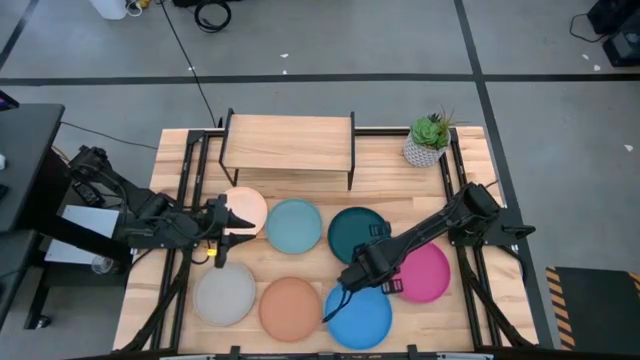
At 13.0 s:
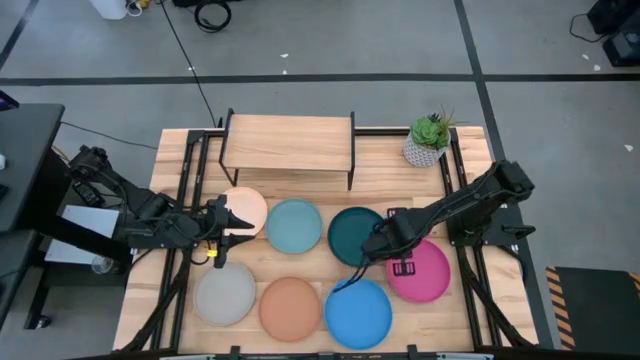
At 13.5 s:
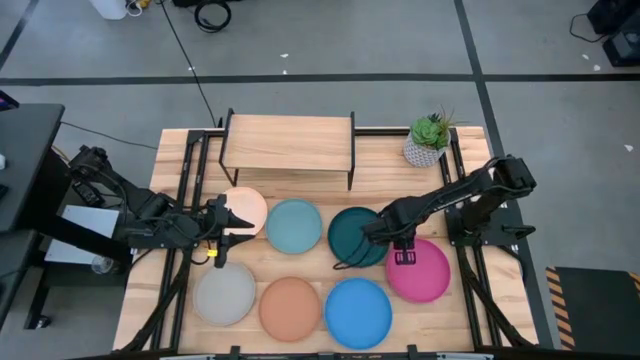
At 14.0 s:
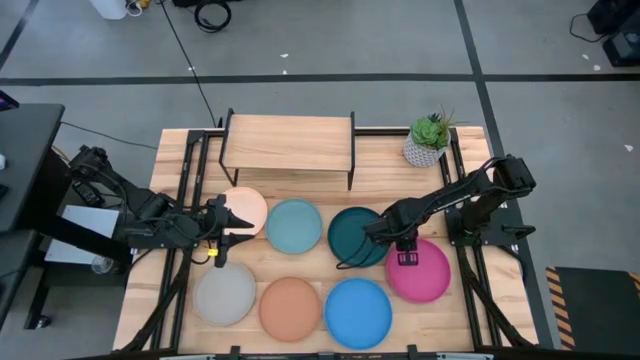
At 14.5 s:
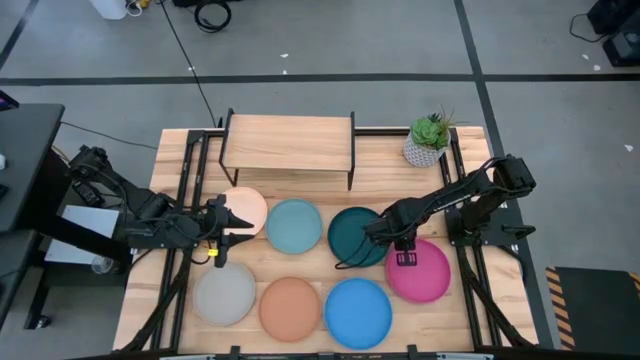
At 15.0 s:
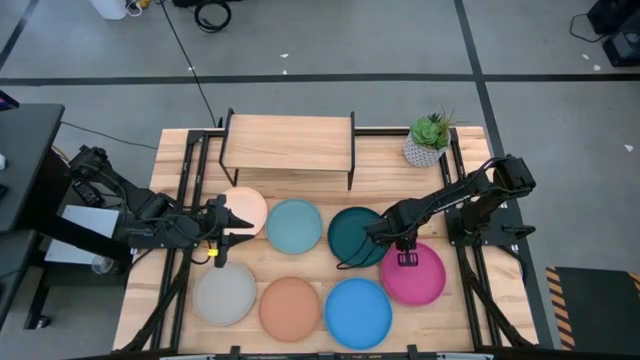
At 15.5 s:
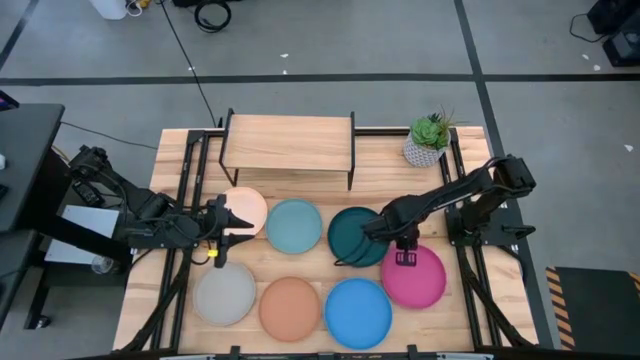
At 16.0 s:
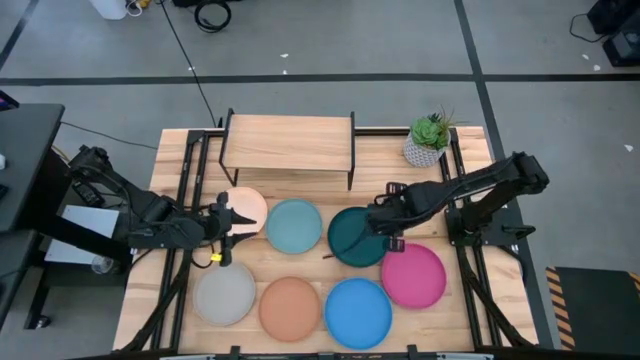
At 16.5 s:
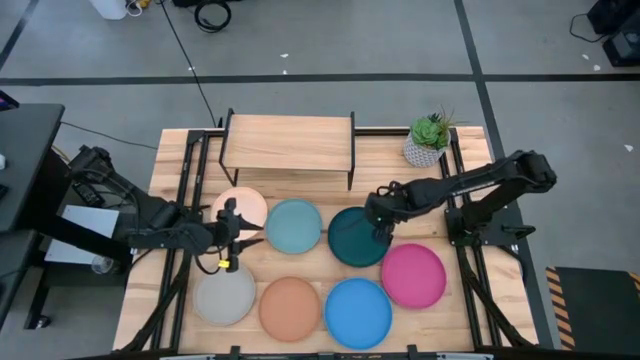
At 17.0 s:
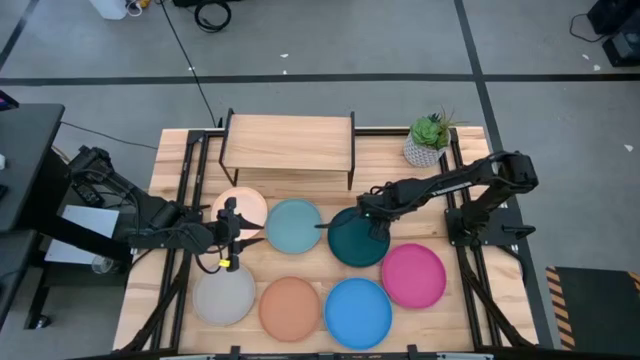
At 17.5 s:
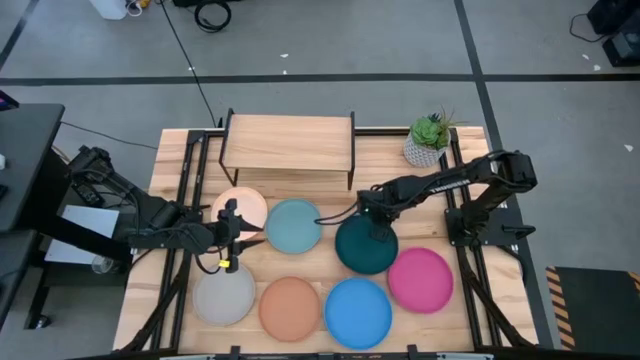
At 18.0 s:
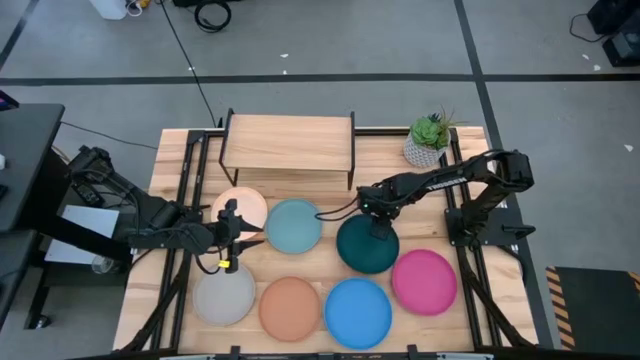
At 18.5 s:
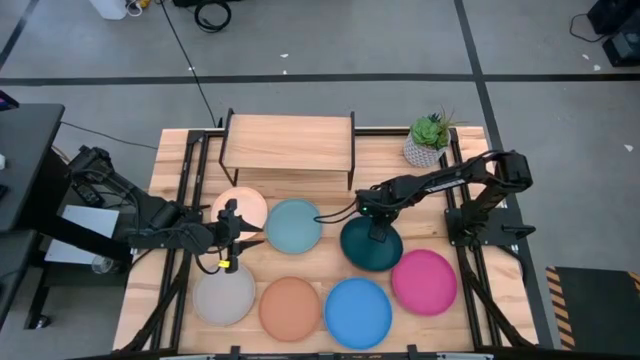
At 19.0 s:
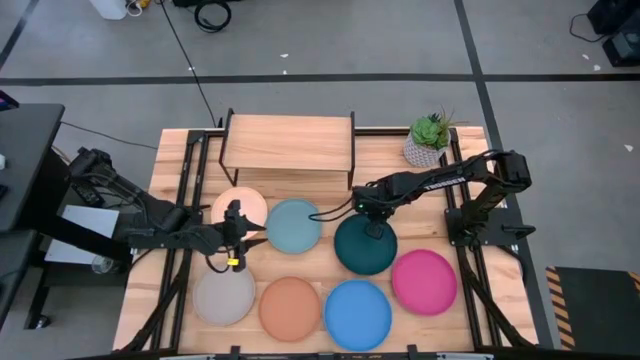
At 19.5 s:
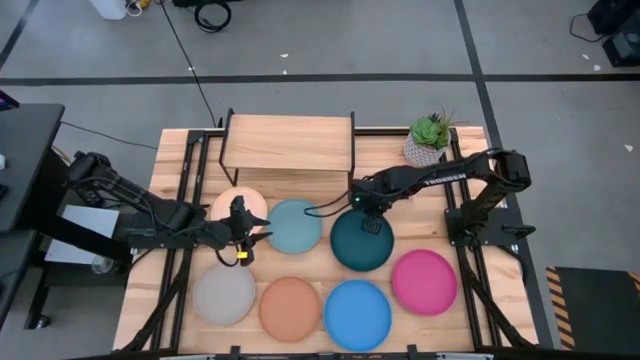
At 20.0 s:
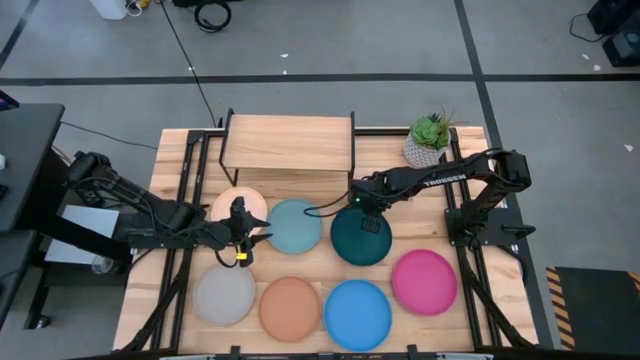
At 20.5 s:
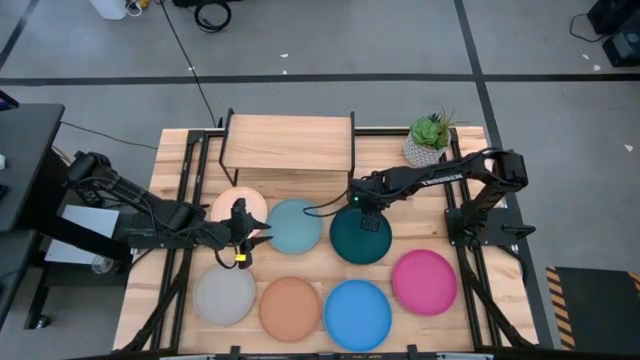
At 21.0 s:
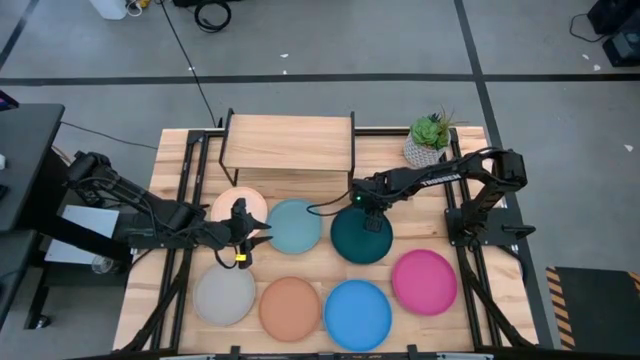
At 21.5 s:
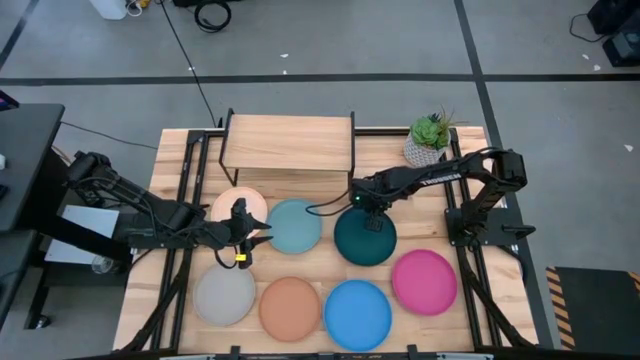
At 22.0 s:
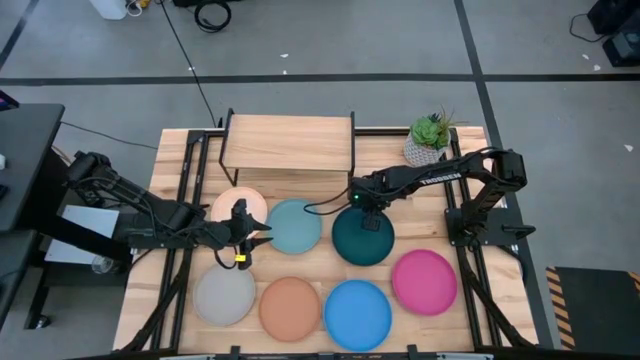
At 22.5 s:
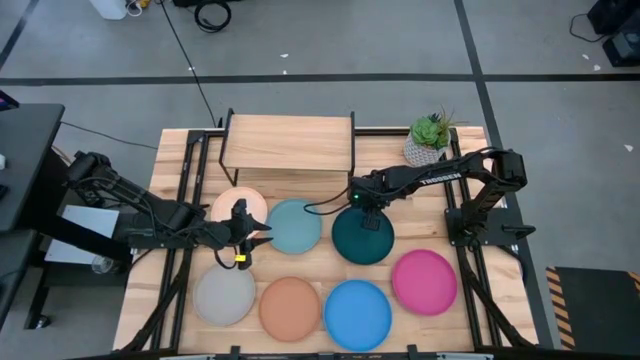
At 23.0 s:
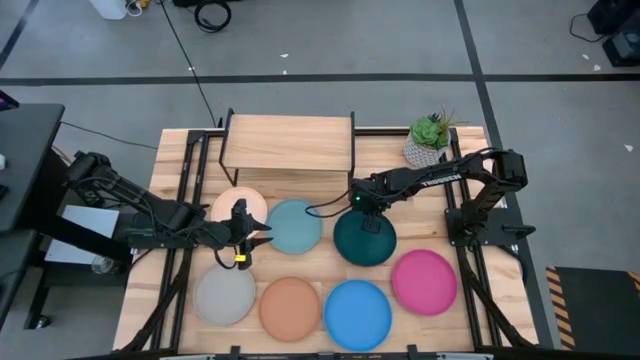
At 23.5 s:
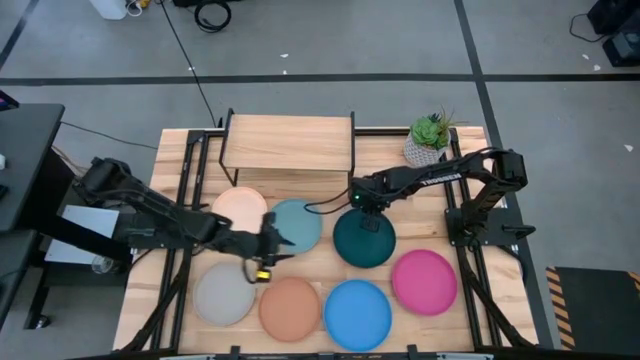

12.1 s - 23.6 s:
Task: Place and stack plates onto a shelf
Put the dark green plate on the shelf

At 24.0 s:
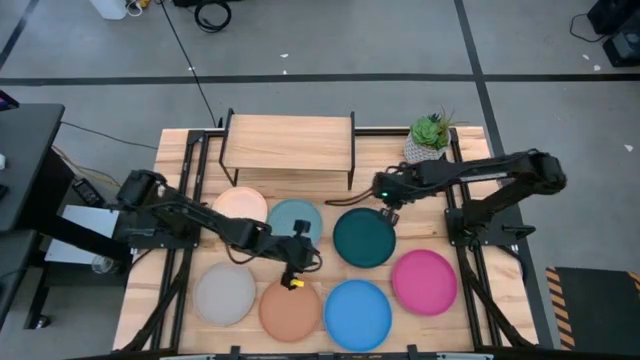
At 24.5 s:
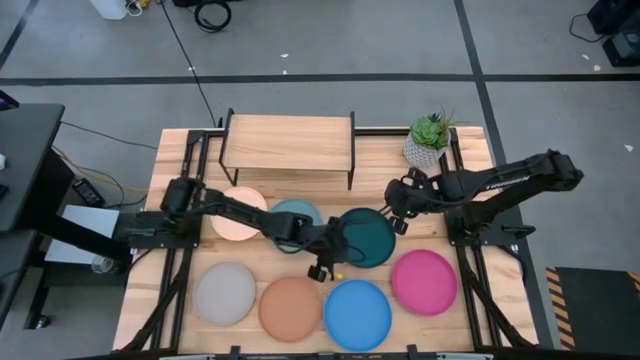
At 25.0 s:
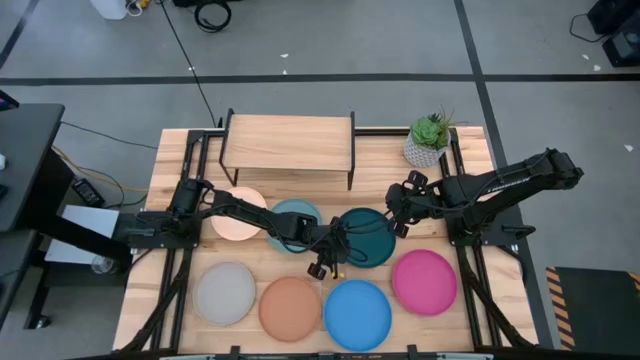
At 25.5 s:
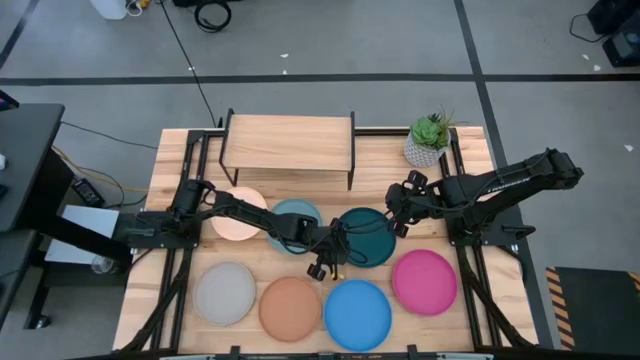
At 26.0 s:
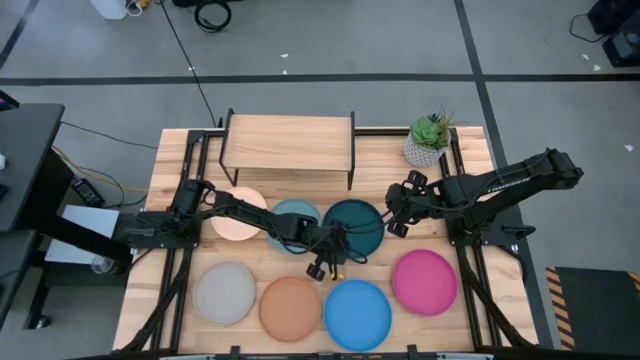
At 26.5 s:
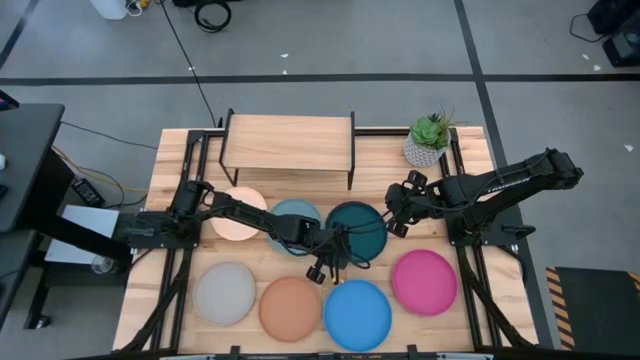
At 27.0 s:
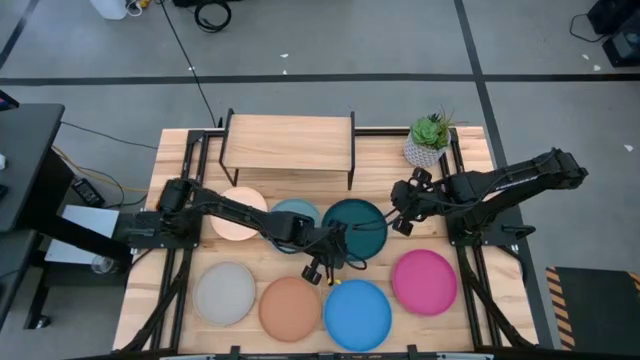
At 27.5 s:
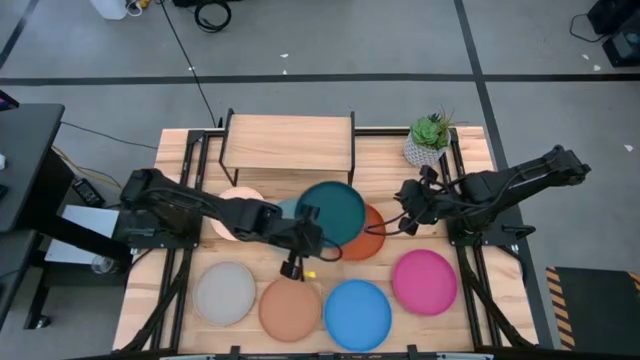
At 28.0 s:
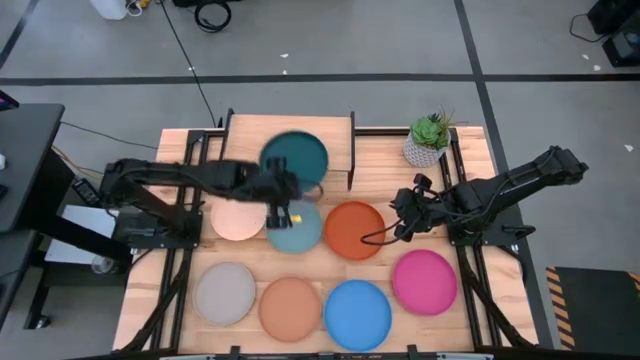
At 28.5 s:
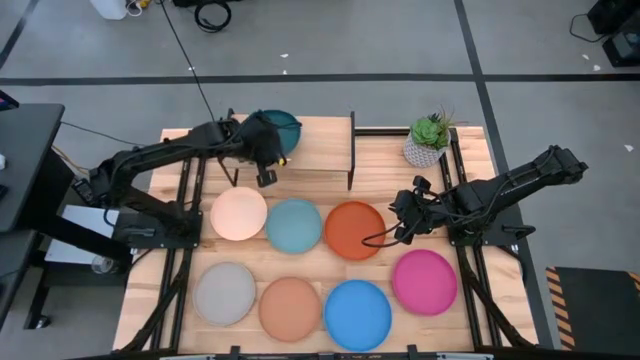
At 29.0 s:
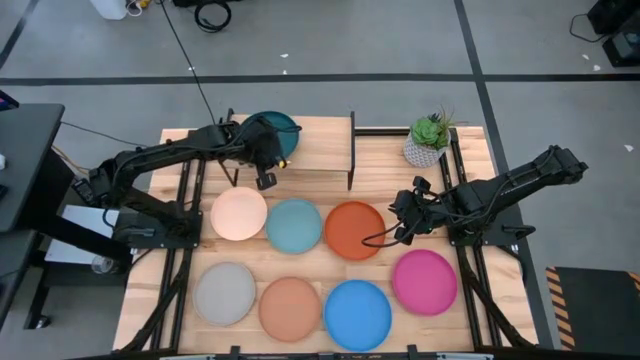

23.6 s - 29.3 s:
Put the dark green plate on the shelf

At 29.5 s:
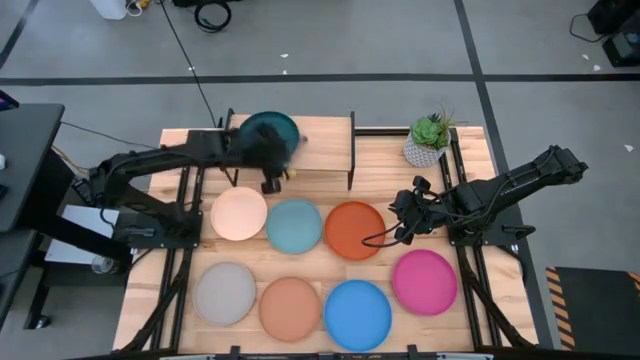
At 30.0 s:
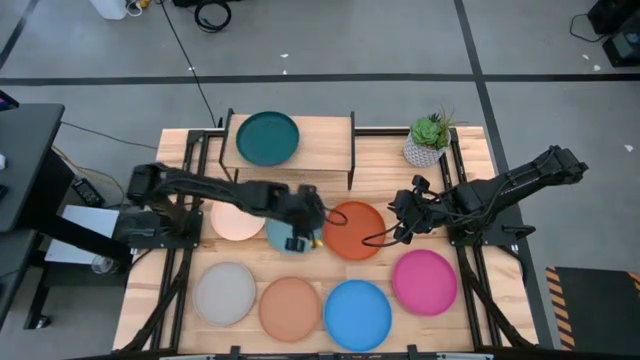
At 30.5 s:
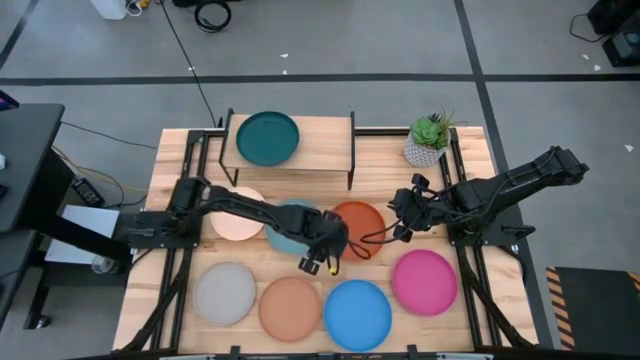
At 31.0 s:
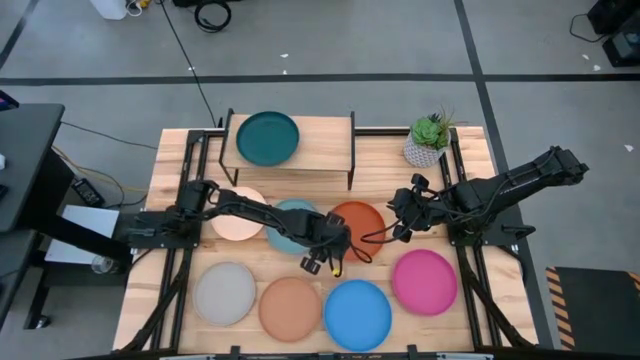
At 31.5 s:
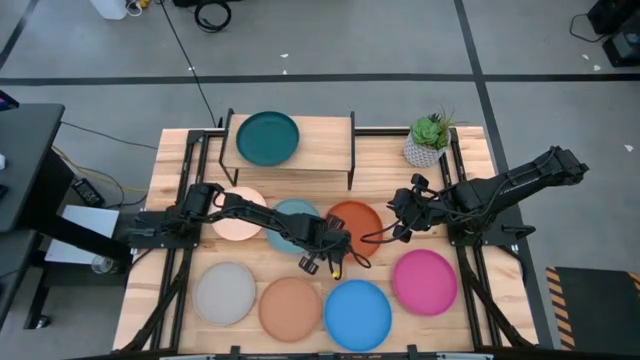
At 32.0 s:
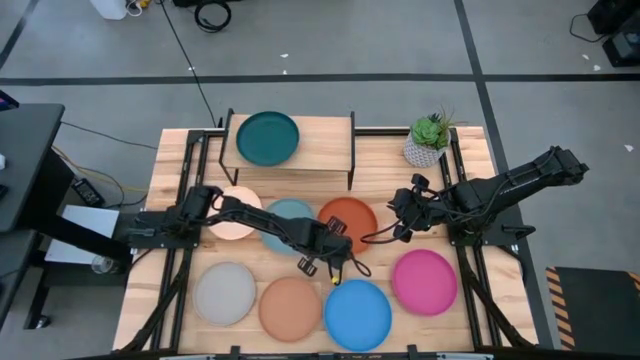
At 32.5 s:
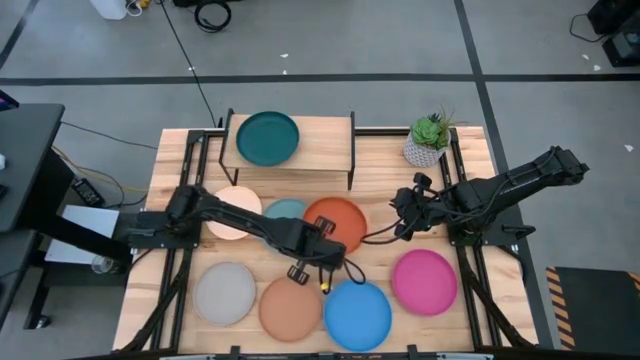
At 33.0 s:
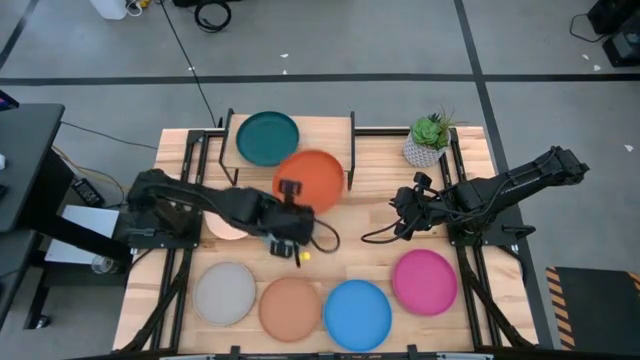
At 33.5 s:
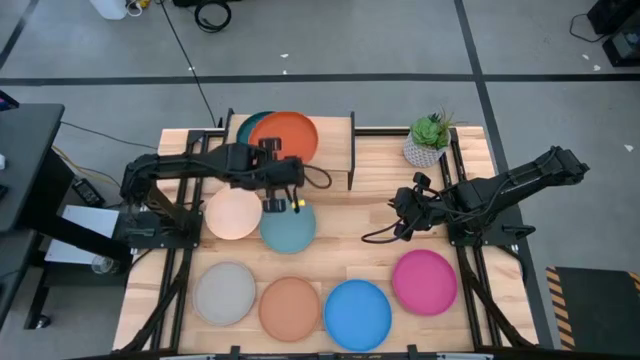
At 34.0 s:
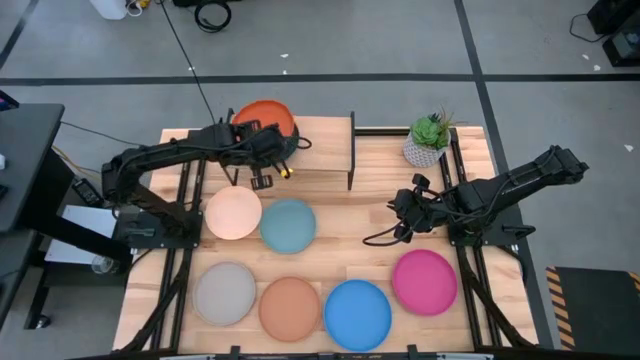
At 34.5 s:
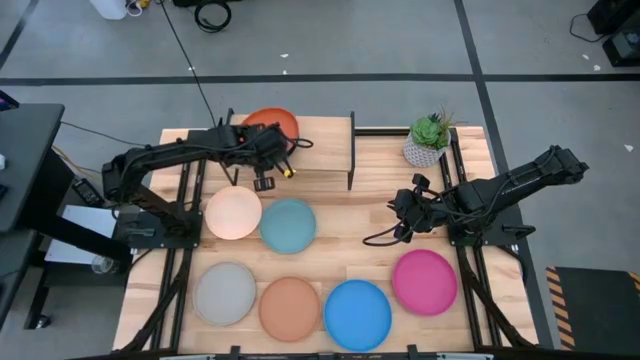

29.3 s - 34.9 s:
Stack the orange plate on the dark blue plate on the shelf
